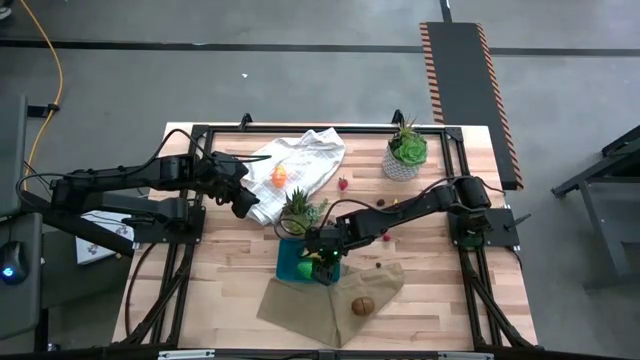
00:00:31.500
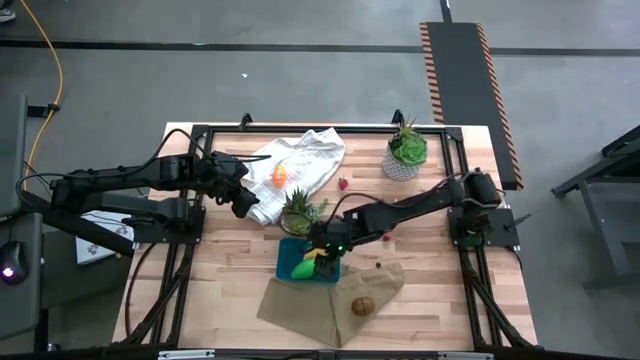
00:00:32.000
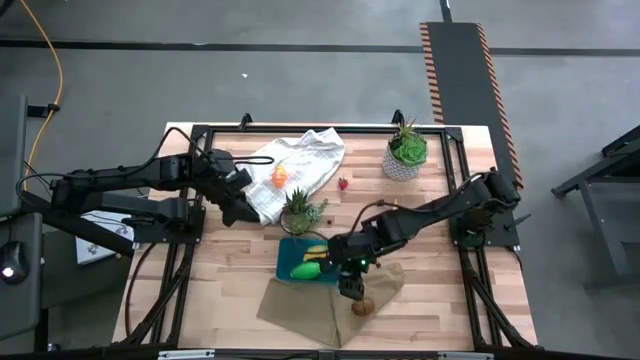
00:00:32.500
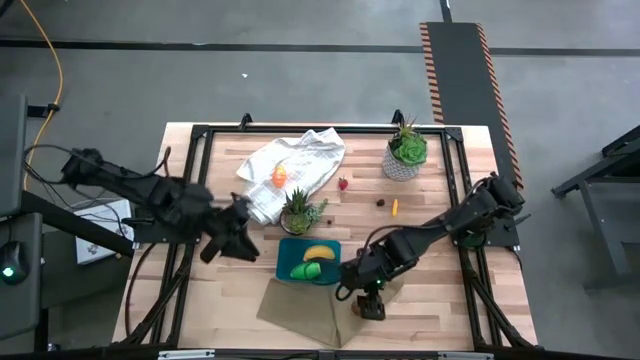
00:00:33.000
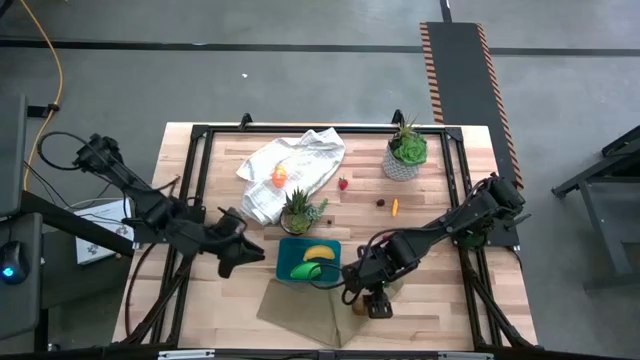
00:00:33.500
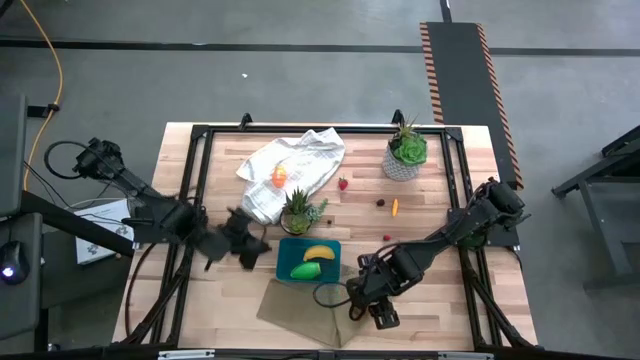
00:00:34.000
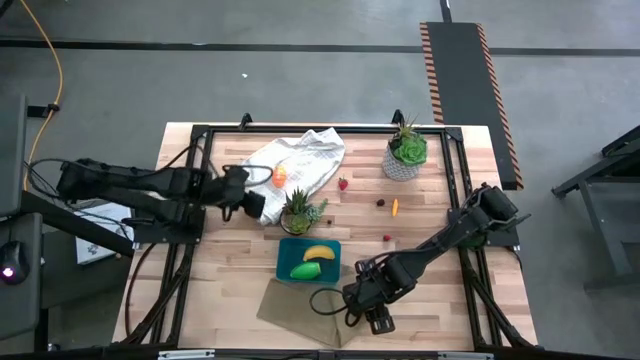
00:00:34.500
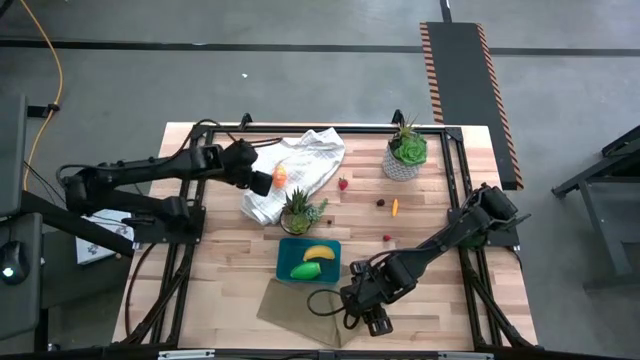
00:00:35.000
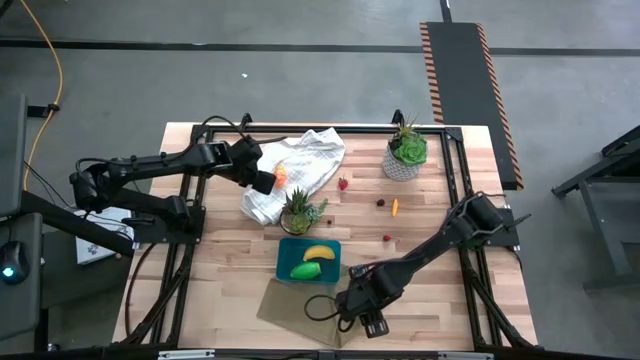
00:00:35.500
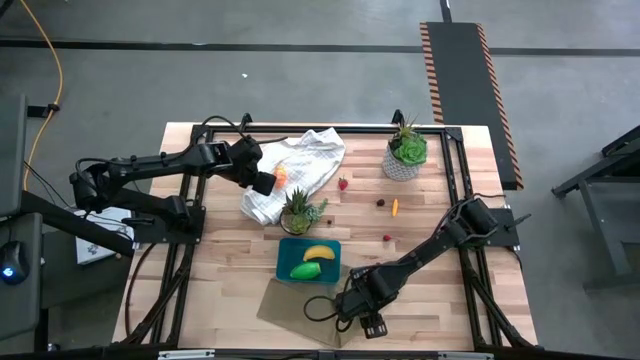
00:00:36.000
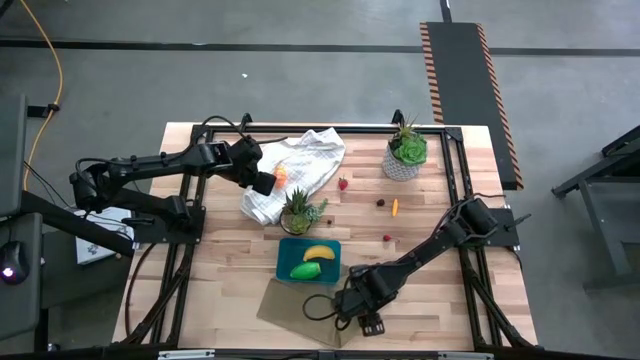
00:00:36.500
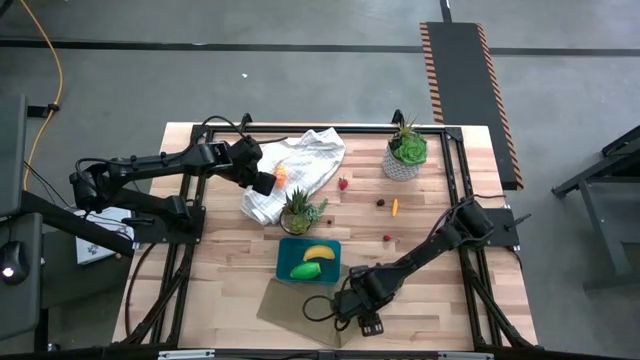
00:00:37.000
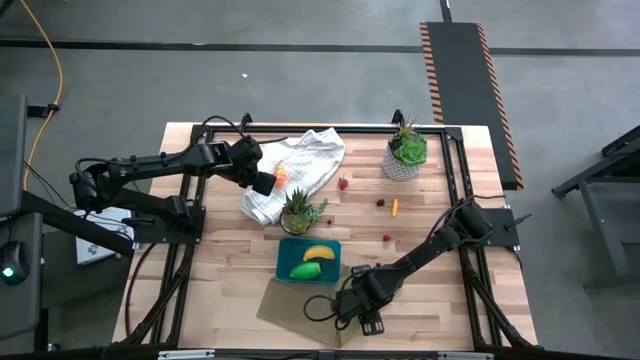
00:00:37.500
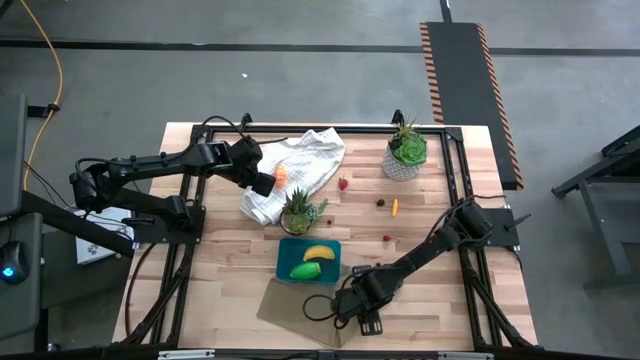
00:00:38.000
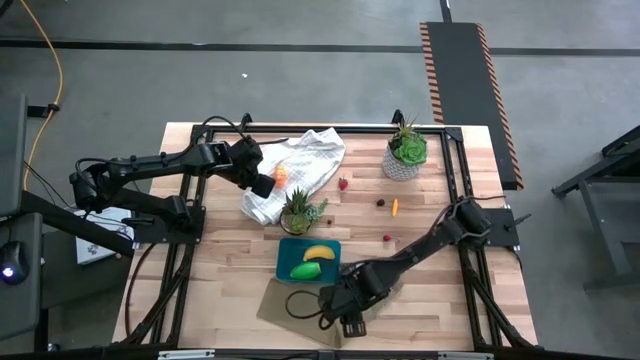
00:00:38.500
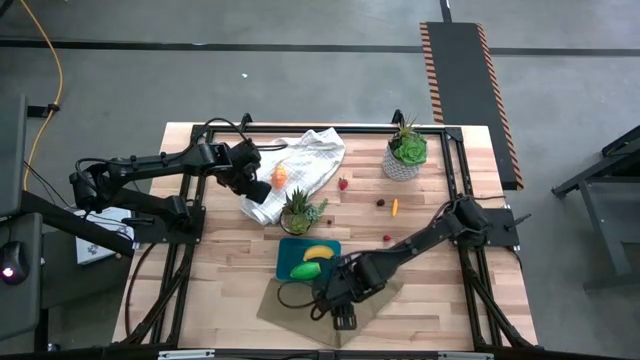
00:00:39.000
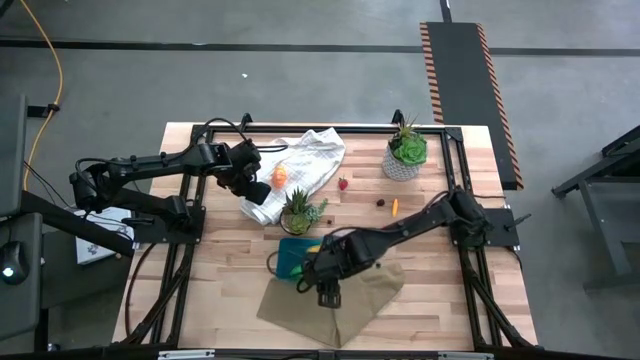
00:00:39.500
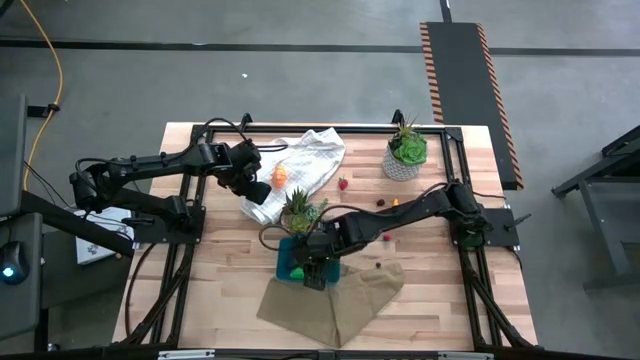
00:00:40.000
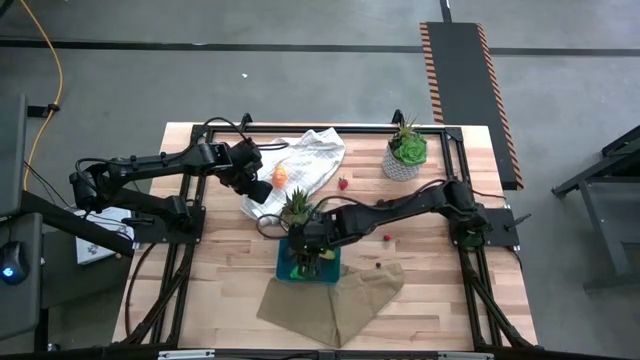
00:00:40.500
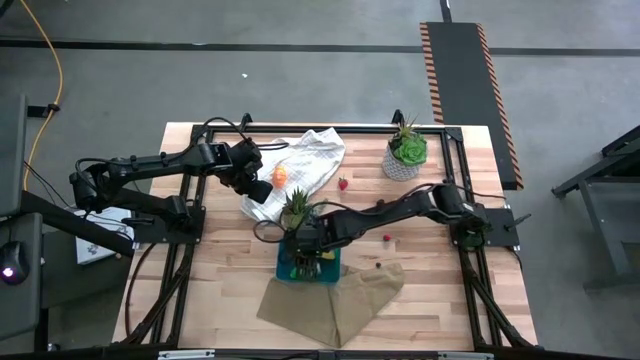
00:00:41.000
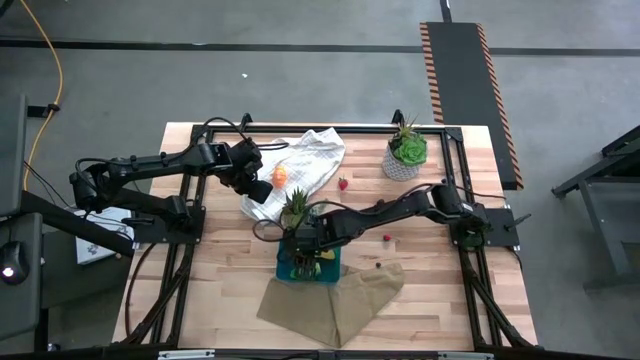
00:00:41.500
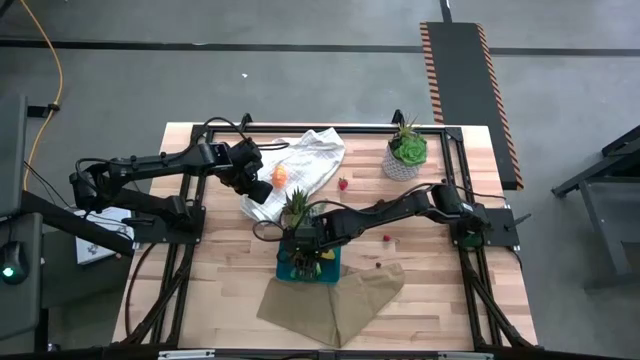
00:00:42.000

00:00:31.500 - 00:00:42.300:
Task: Pick and placing Produce into tupperware
Put the kiwi into the blue bin

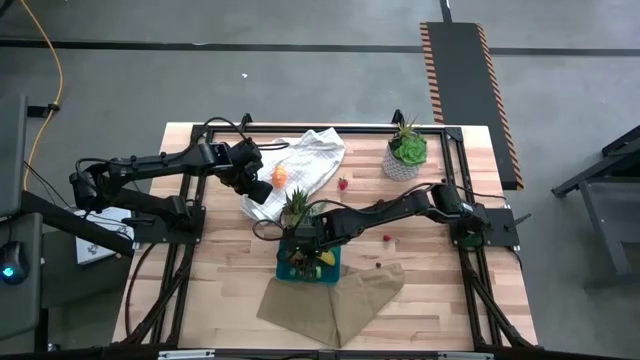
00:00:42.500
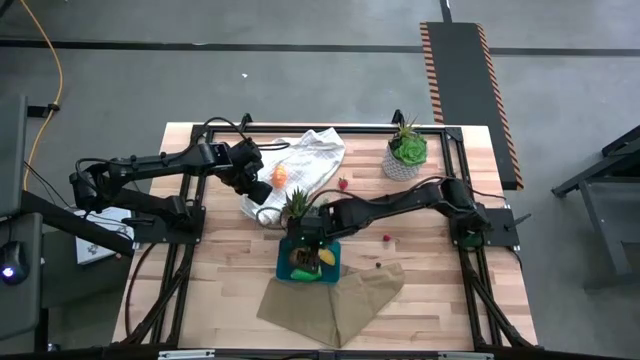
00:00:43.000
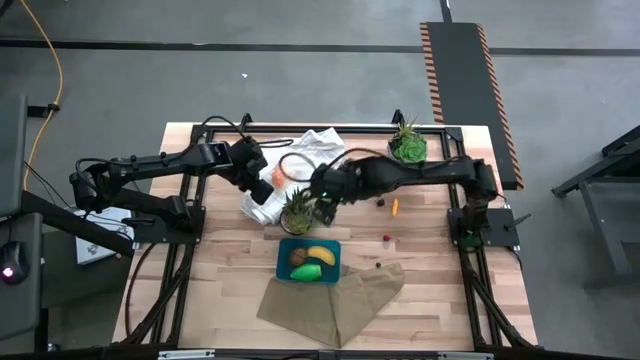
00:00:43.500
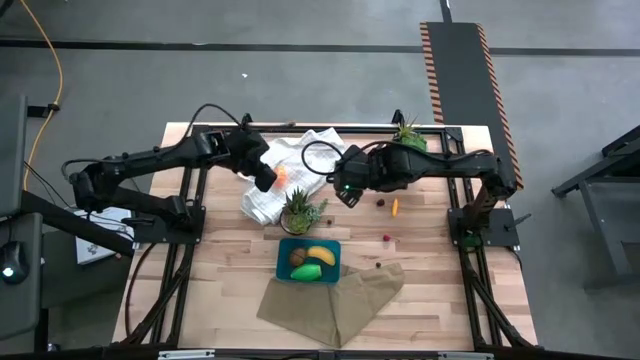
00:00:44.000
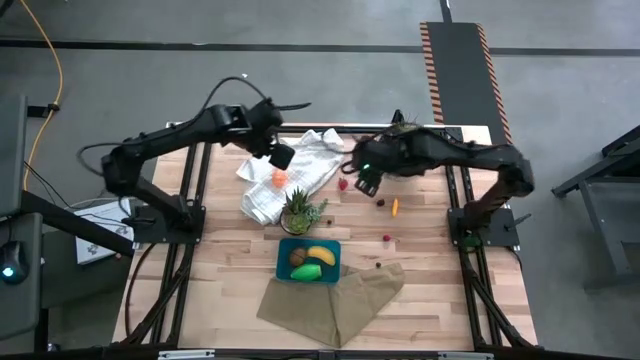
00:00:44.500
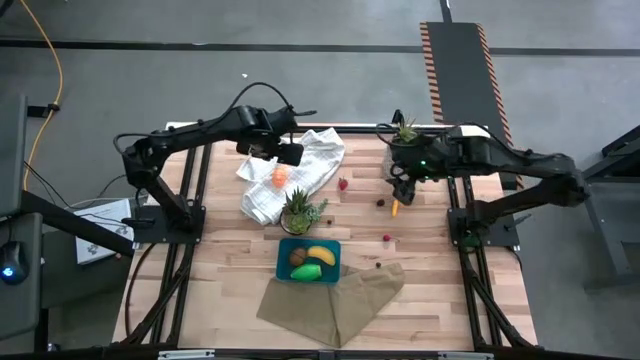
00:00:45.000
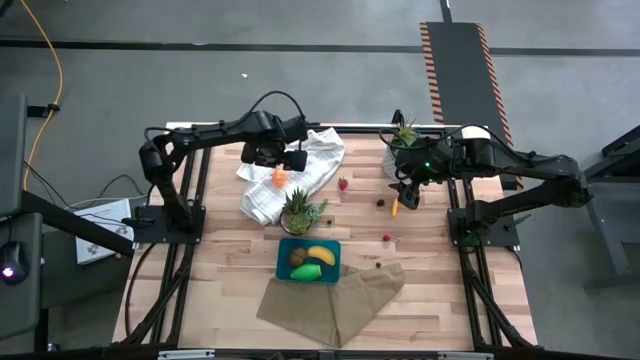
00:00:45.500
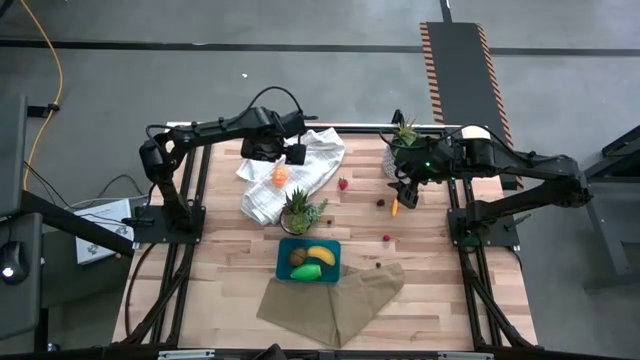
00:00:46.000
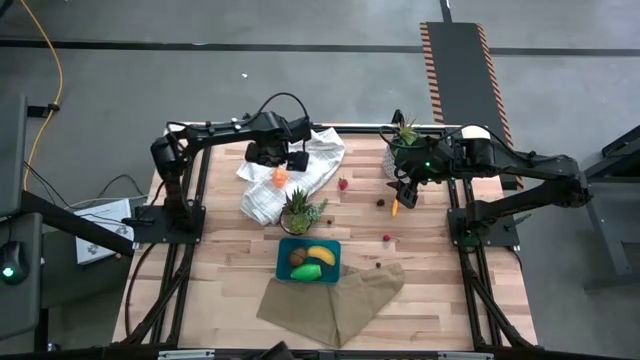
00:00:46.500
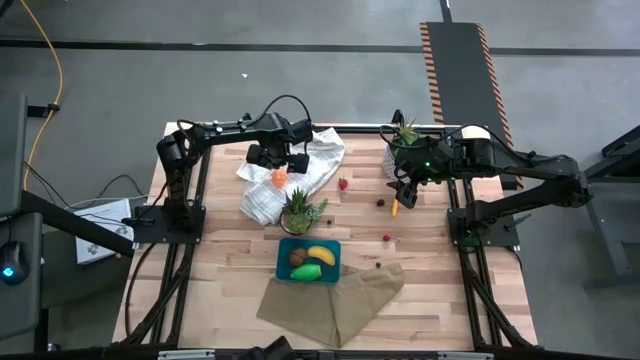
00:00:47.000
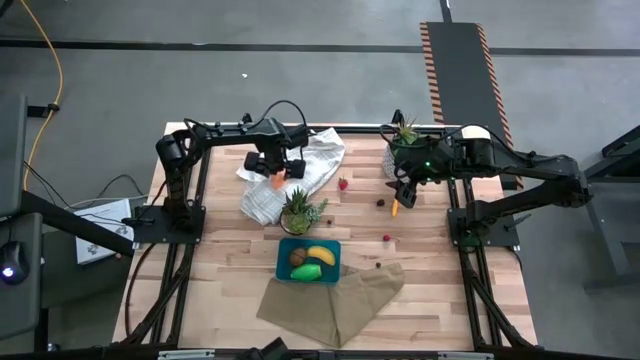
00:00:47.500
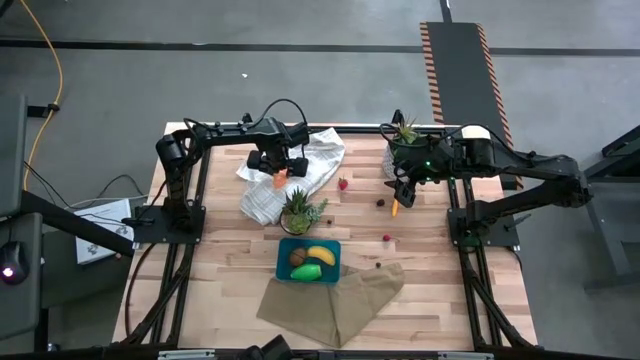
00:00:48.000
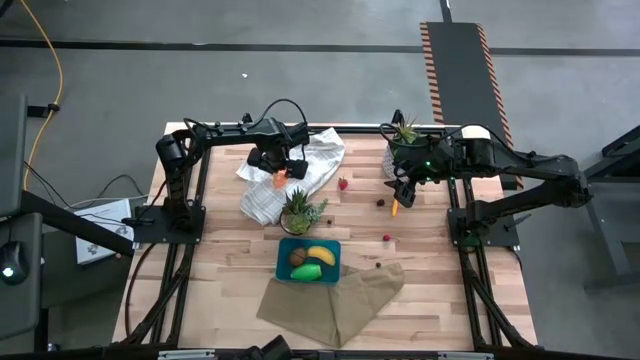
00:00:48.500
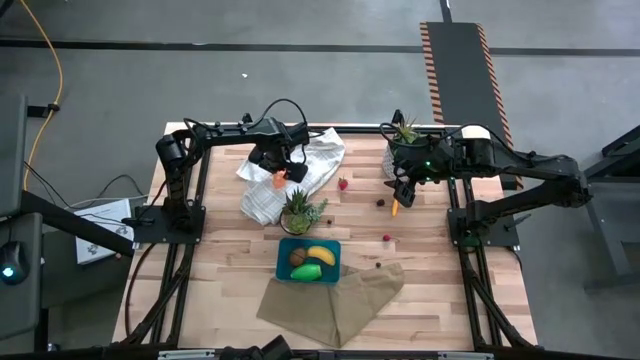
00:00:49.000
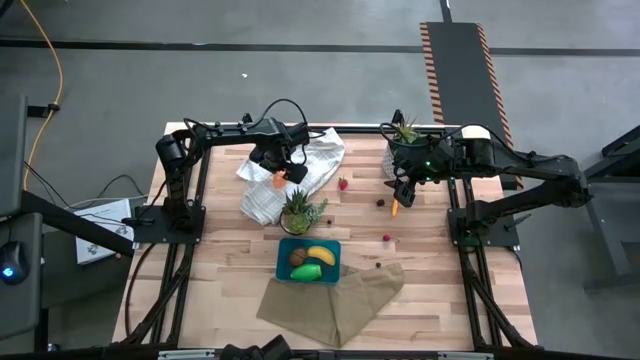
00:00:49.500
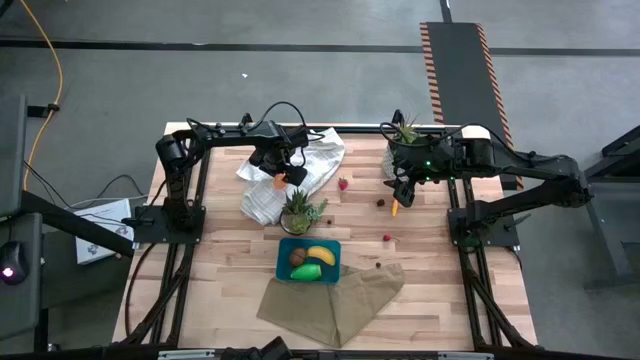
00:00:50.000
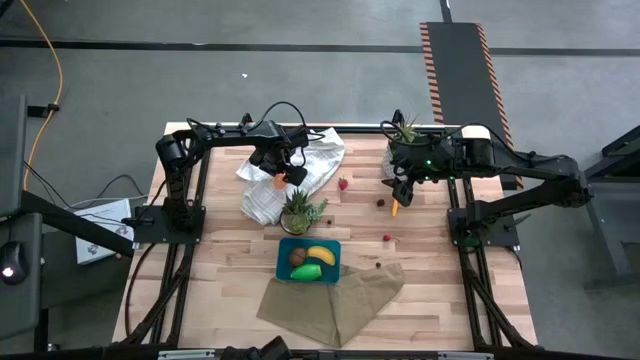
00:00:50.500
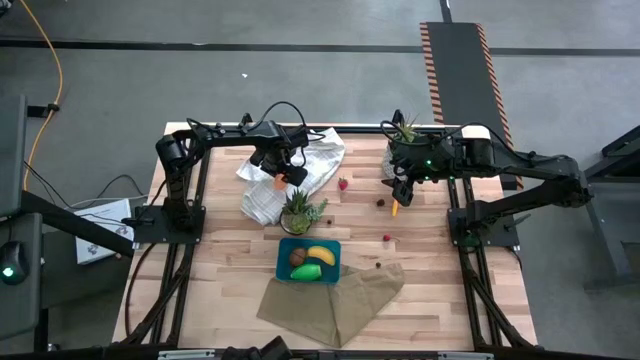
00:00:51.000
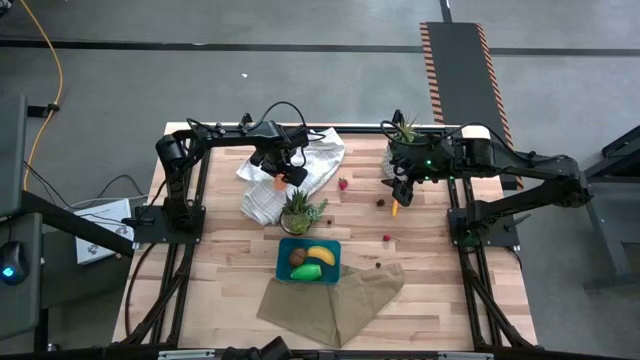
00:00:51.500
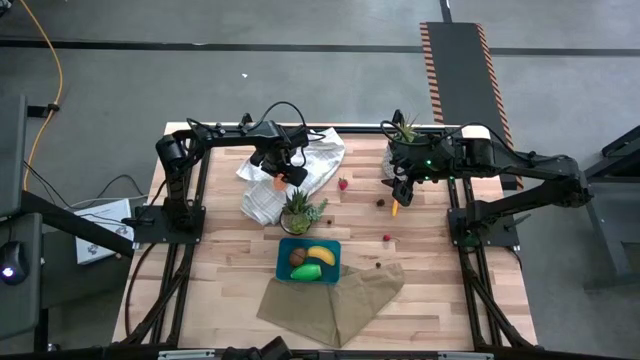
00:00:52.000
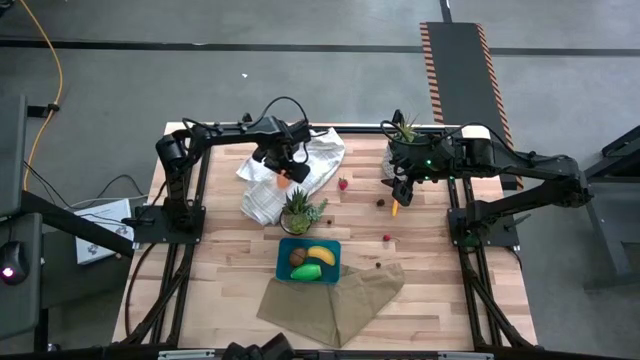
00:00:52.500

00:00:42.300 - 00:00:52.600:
Put the pumpkin into the blue bin
